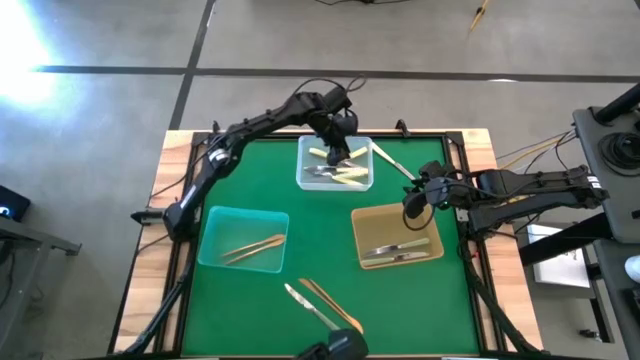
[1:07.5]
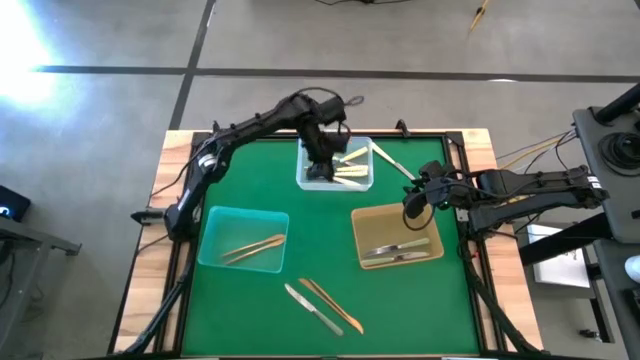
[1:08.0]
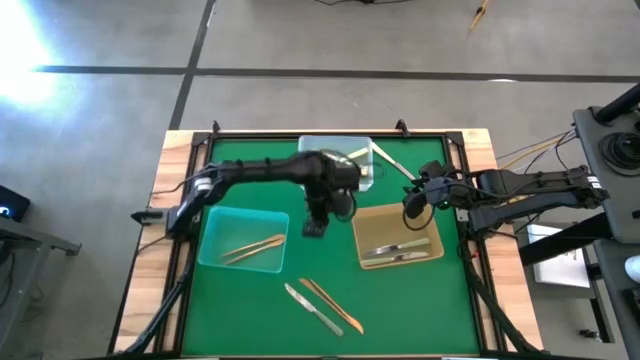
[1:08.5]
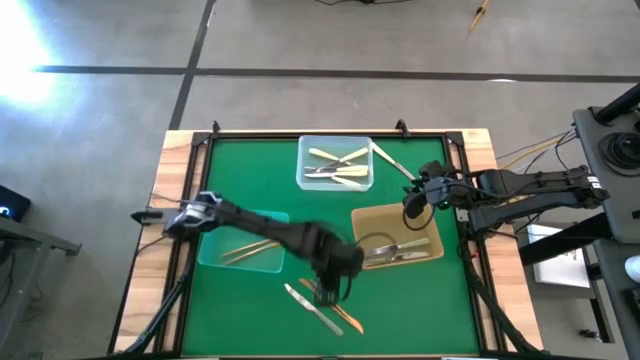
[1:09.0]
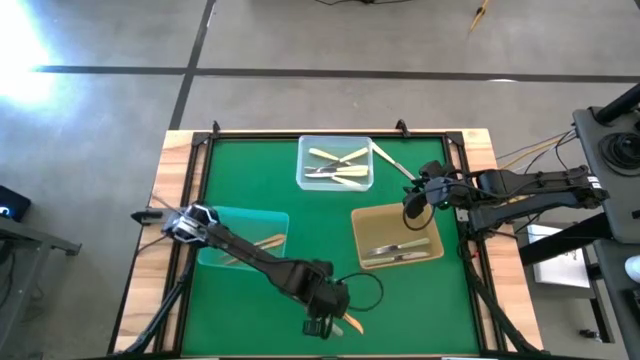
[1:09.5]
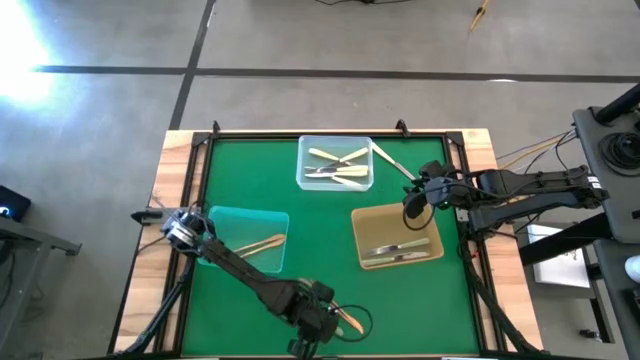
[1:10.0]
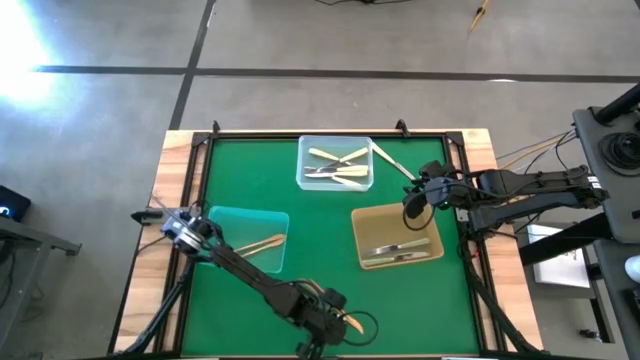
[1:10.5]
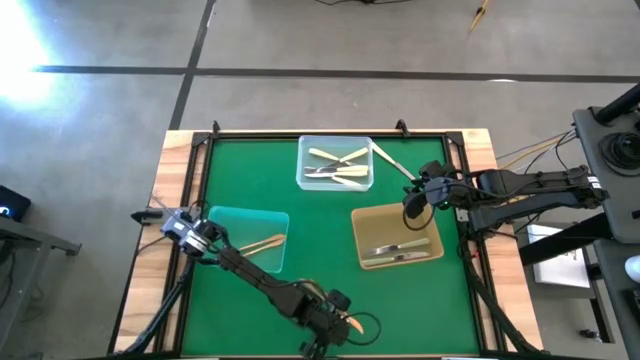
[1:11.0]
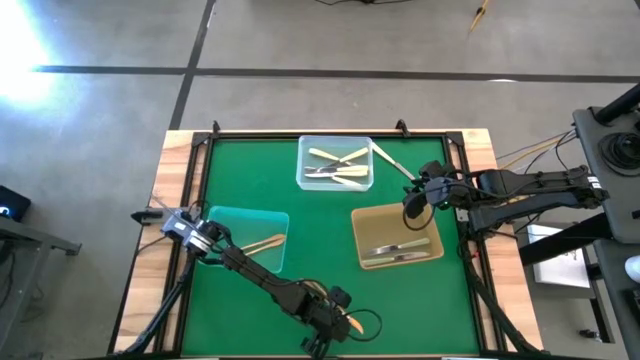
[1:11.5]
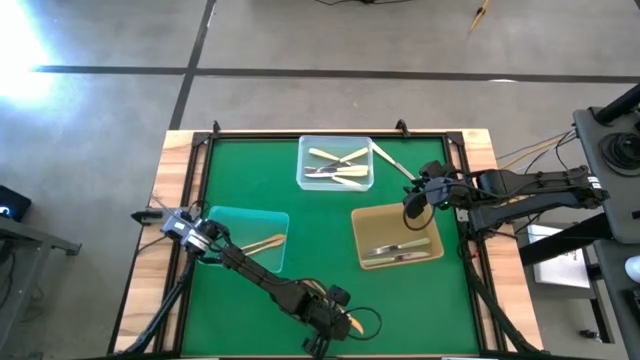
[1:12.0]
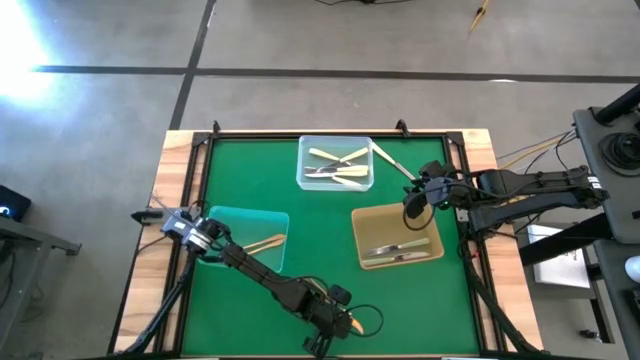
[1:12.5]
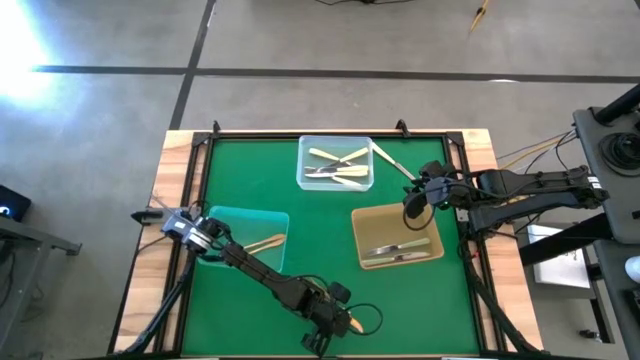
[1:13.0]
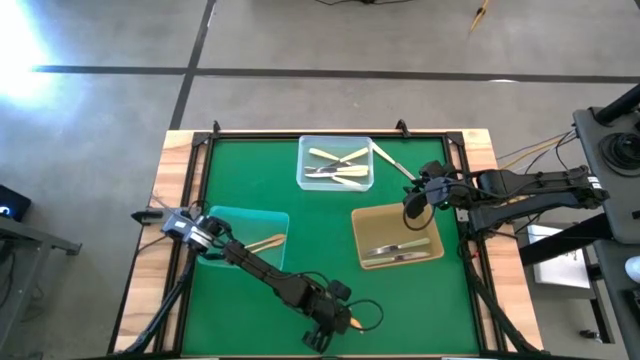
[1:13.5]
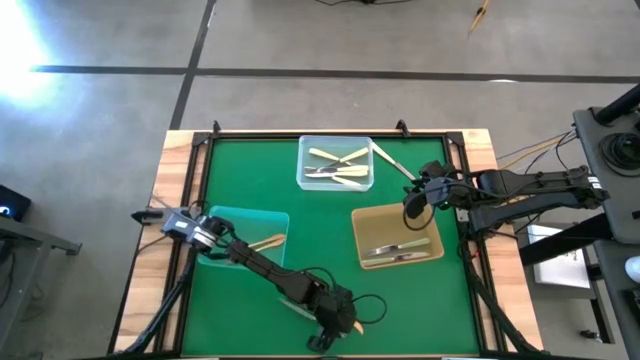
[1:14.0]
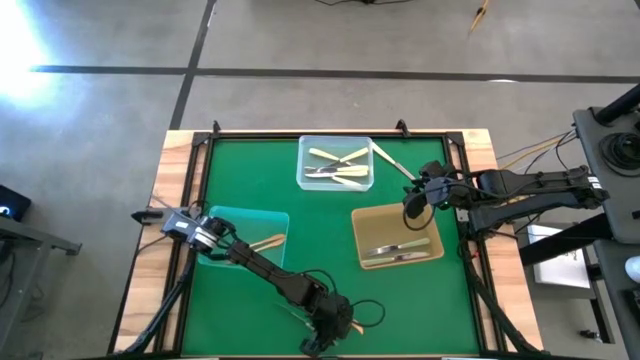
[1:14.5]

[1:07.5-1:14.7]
Task: Sort silverware by color (type)
Put the gray knife into the orange bin

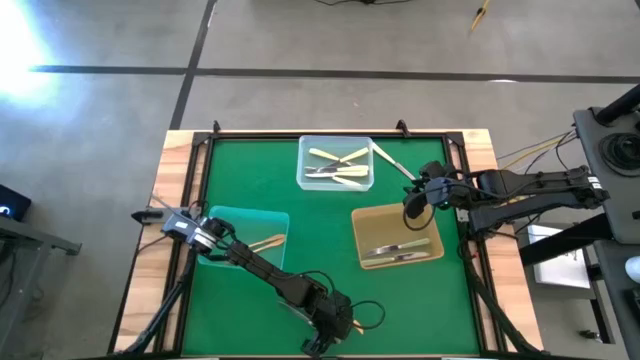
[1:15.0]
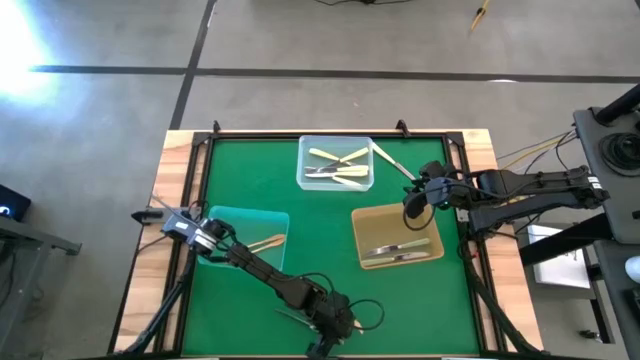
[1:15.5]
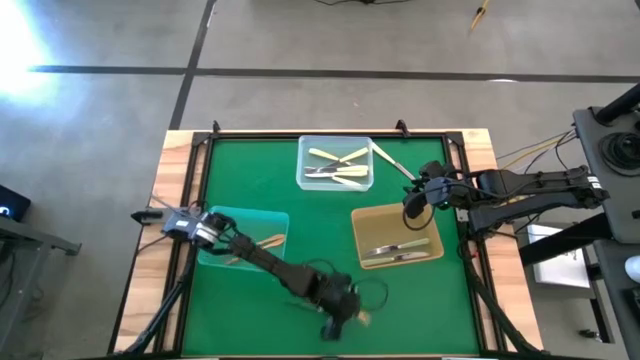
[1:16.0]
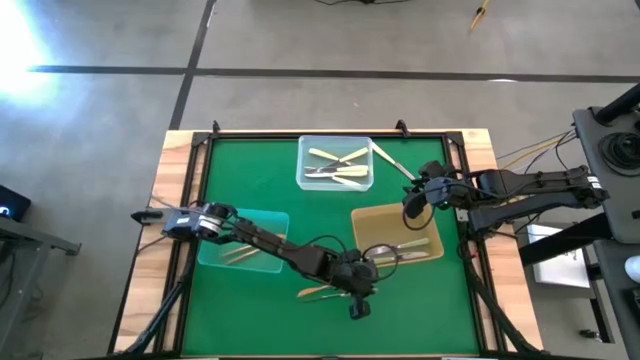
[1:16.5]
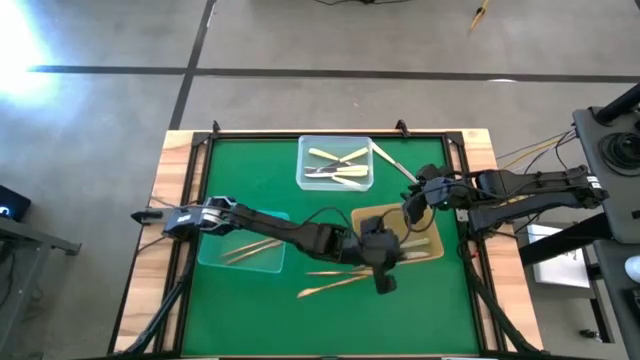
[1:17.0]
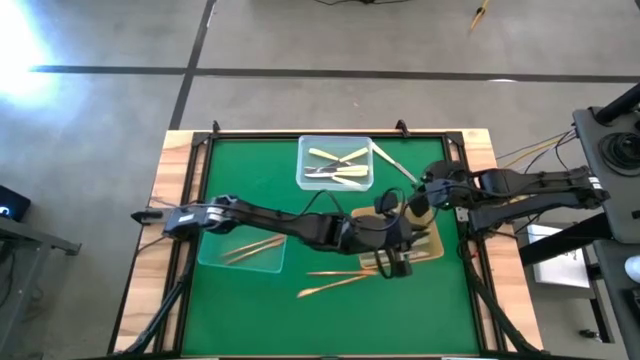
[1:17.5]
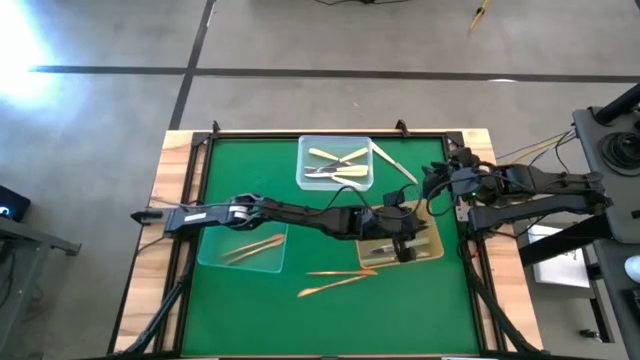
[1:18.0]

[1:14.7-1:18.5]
Put the gray knife into the orange bin

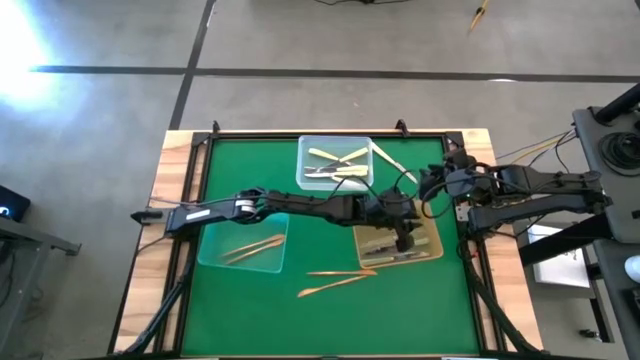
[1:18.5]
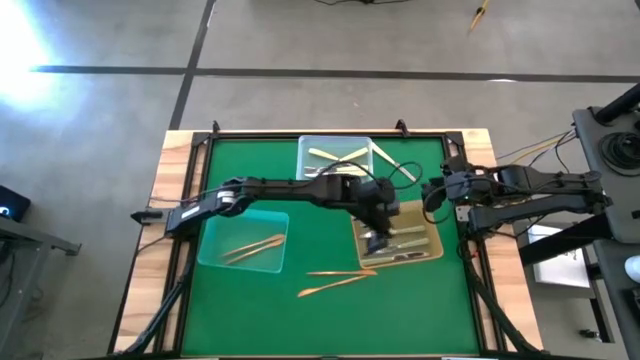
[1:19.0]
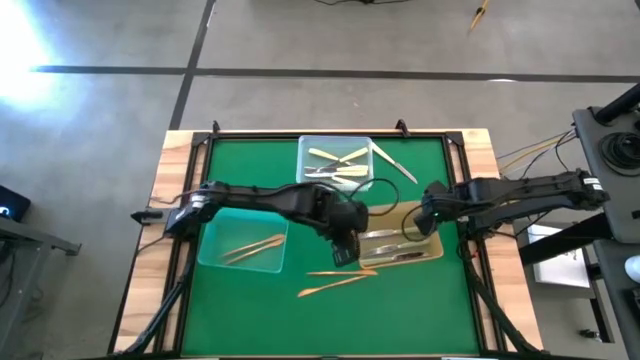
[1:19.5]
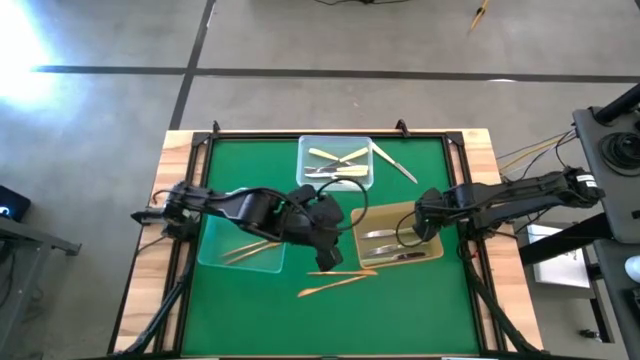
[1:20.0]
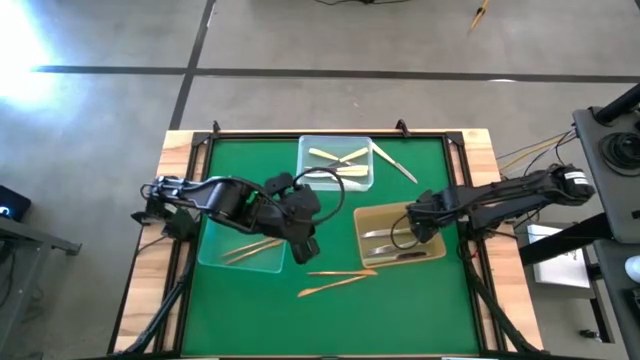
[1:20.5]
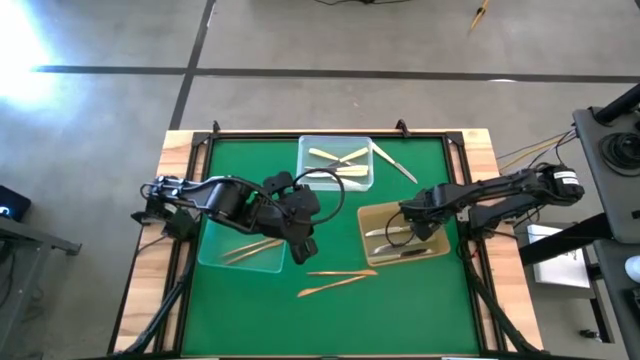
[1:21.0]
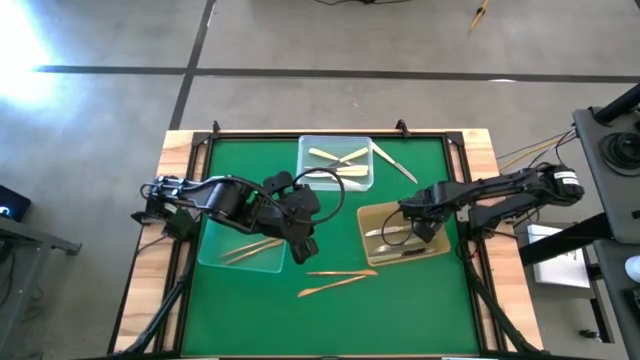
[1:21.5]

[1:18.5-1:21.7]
Adjust the orange bin on the table

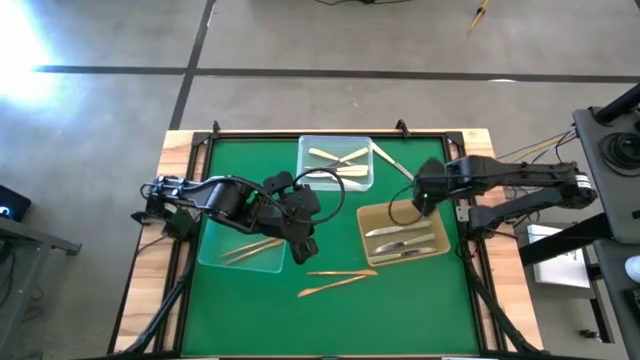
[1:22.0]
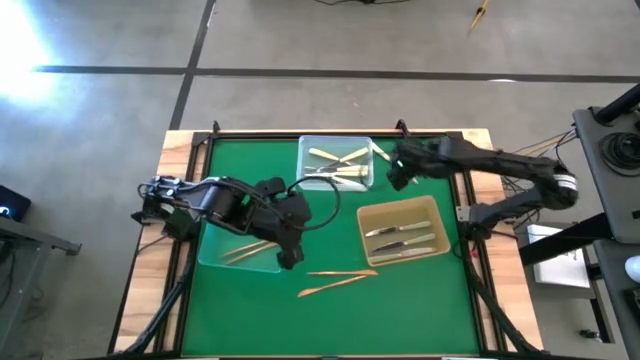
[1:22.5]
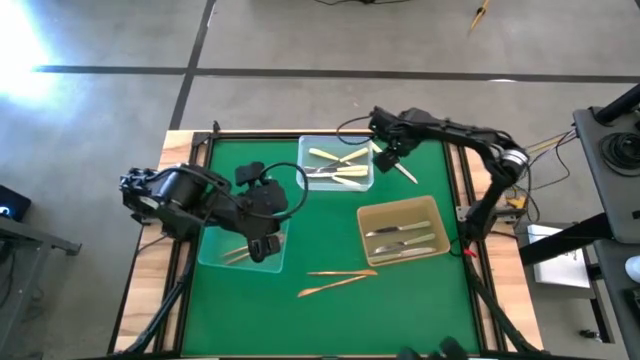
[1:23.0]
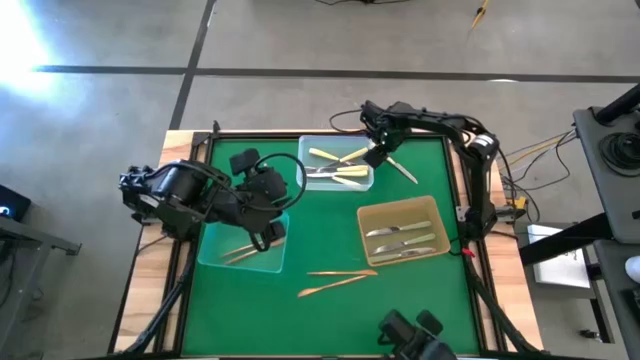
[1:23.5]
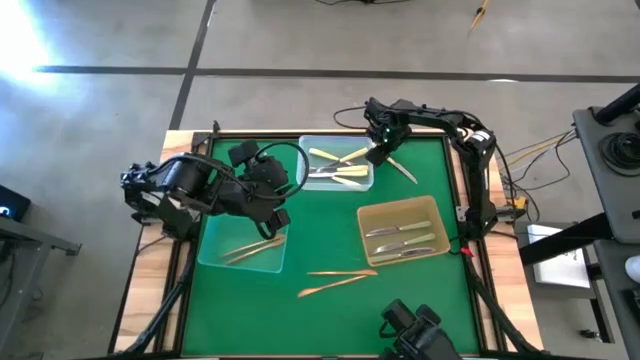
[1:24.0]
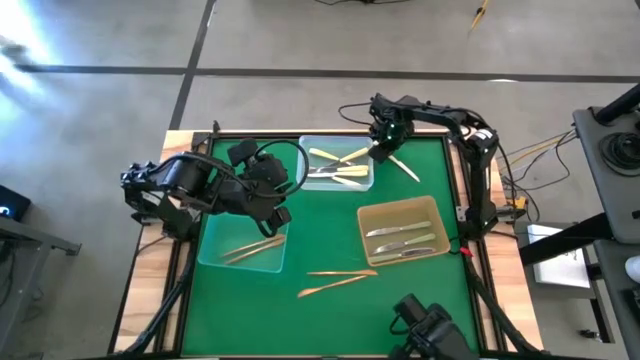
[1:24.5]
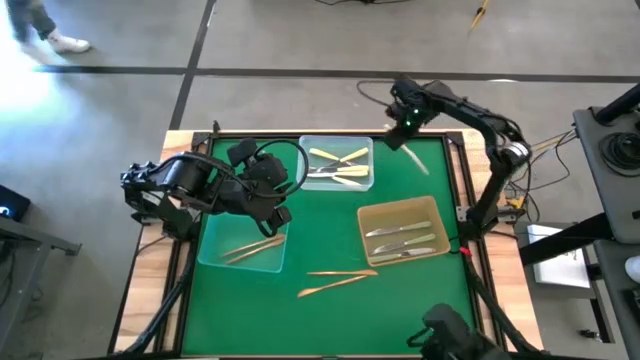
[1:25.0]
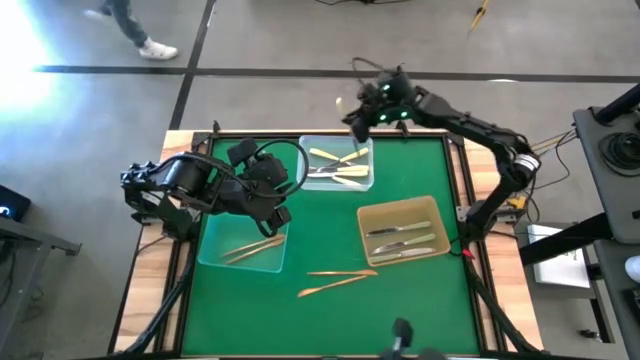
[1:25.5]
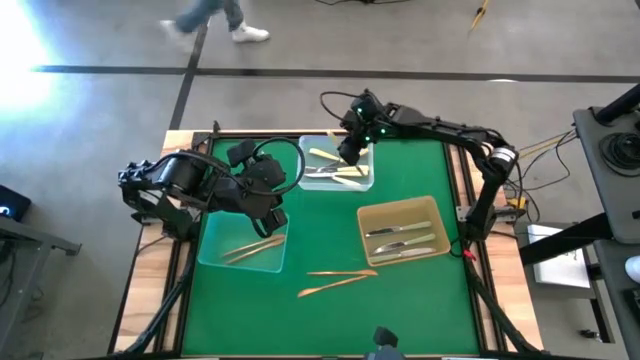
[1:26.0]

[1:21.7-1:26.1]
Put the yellow knife into the transparent bin
